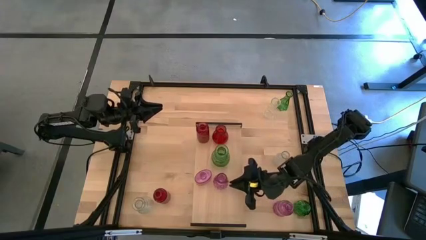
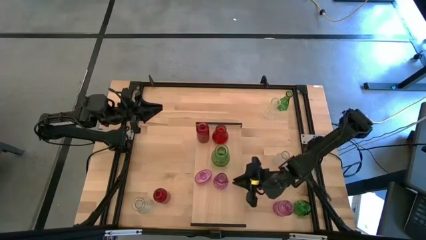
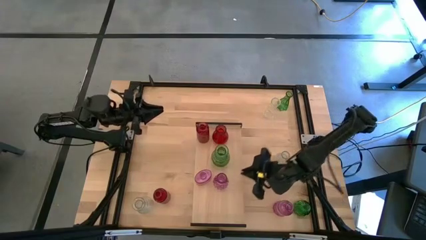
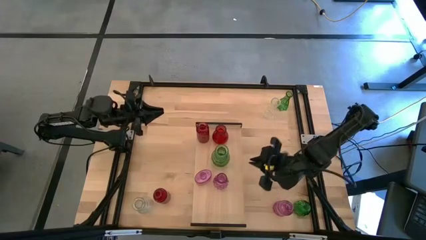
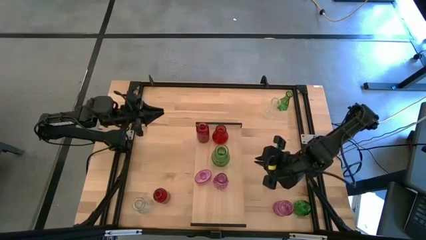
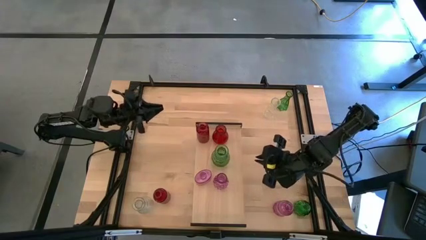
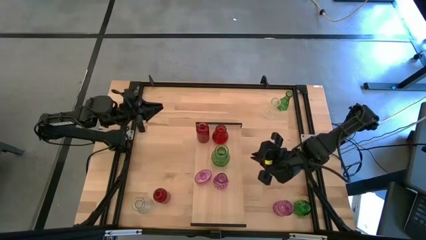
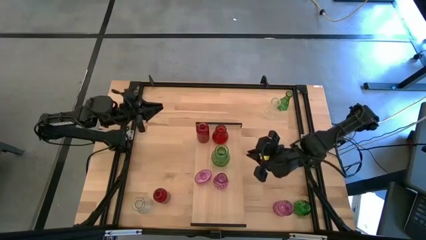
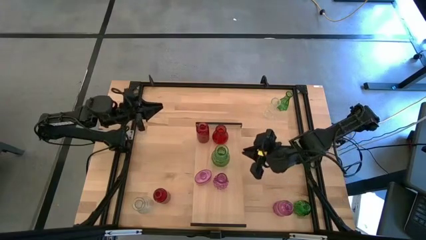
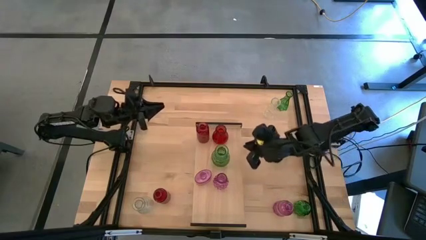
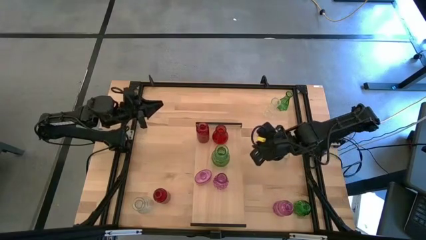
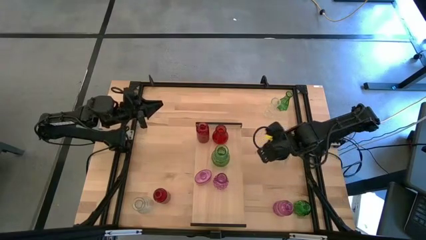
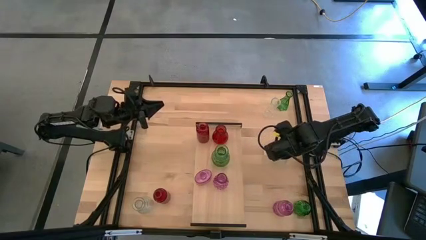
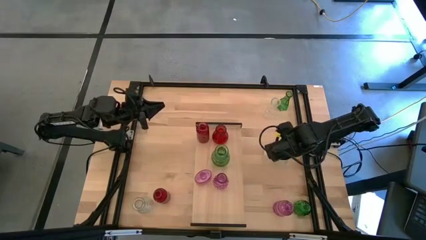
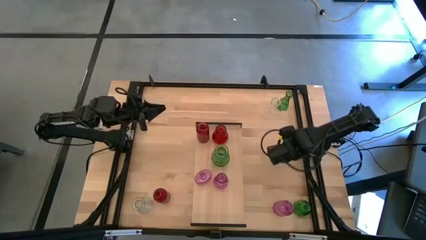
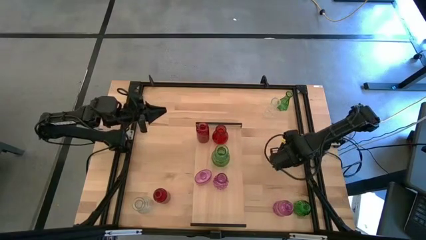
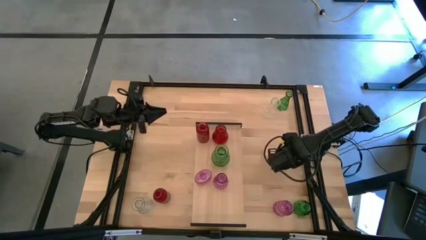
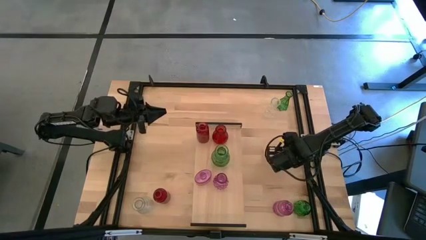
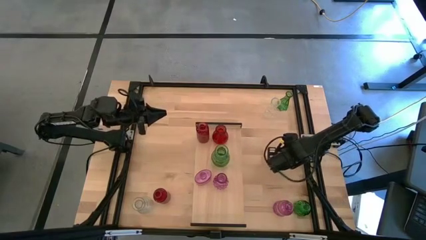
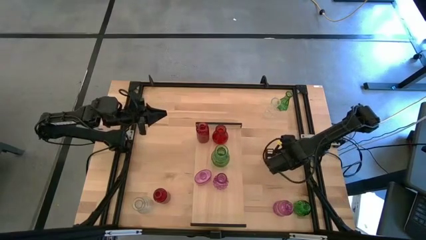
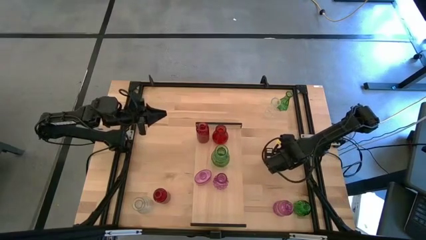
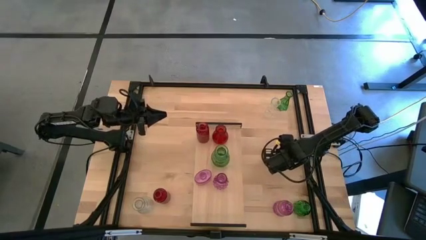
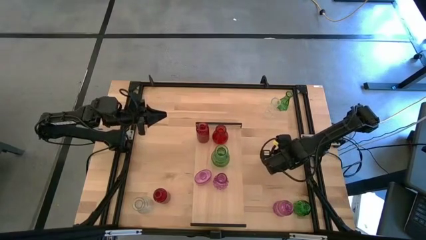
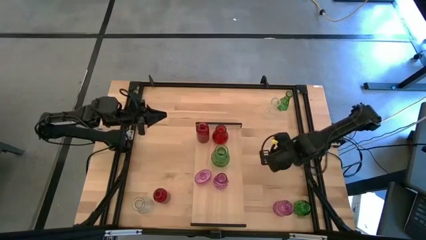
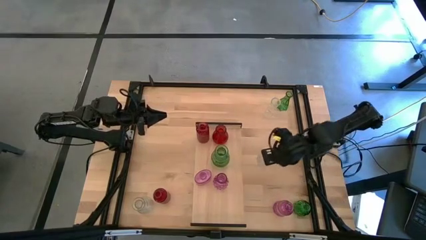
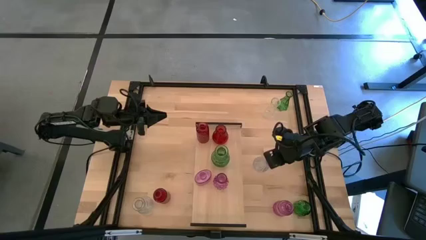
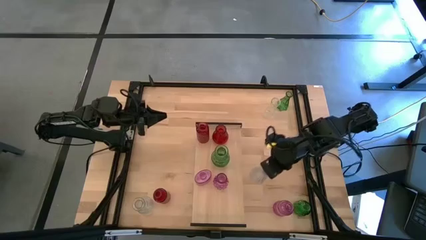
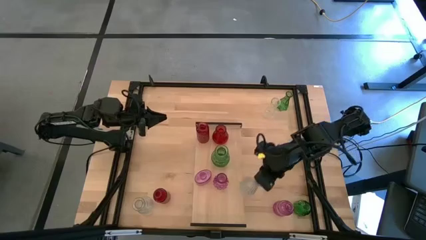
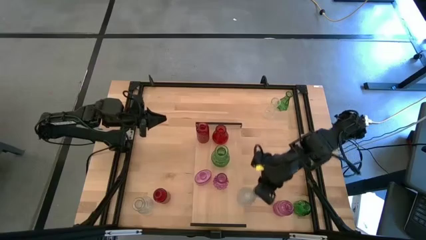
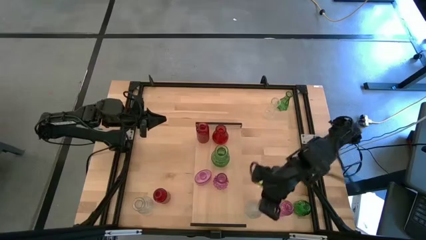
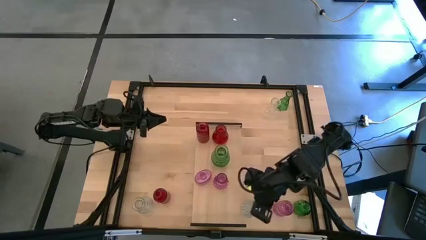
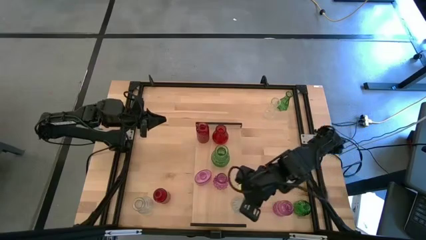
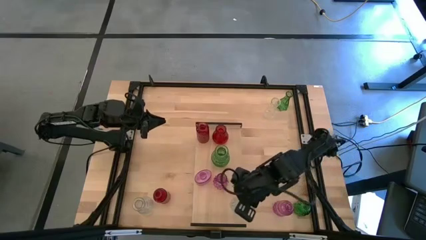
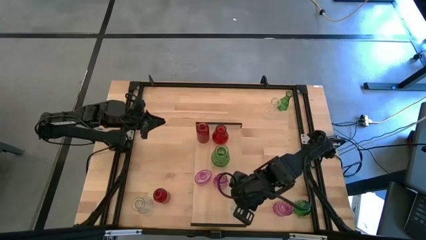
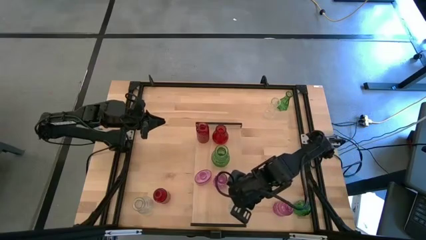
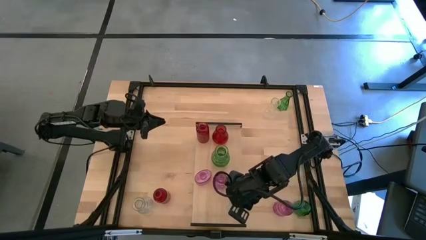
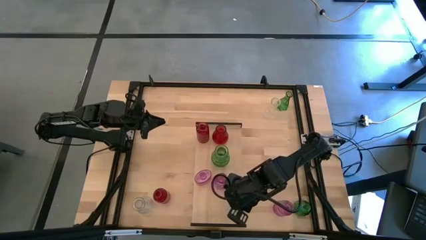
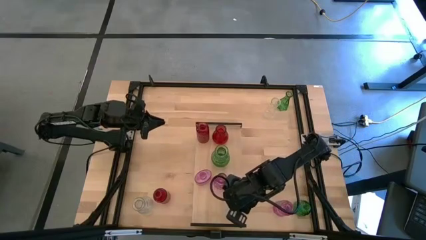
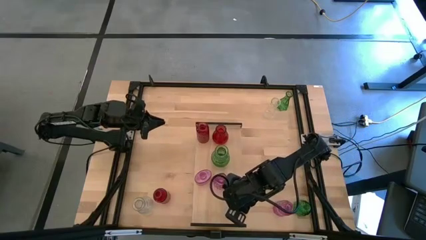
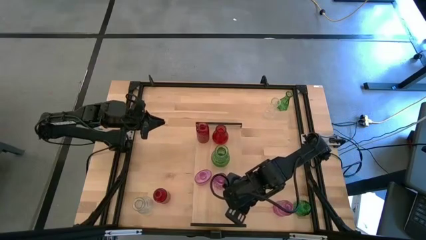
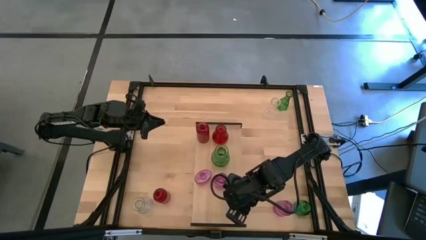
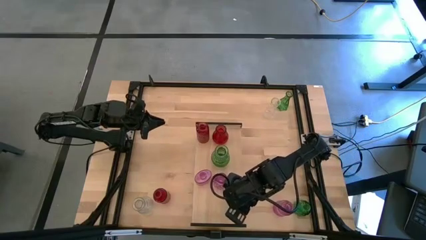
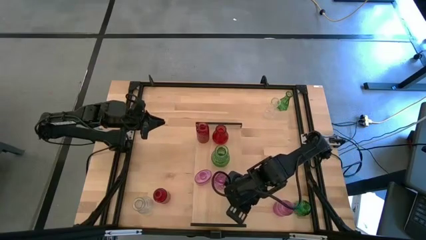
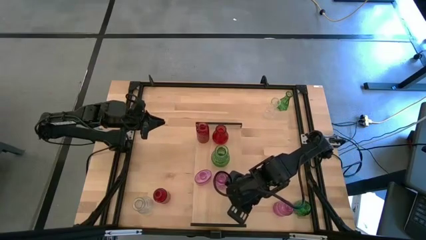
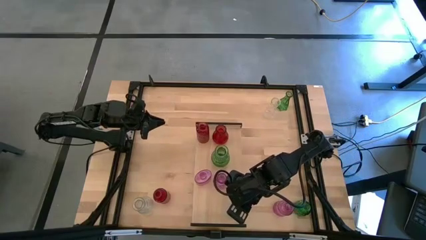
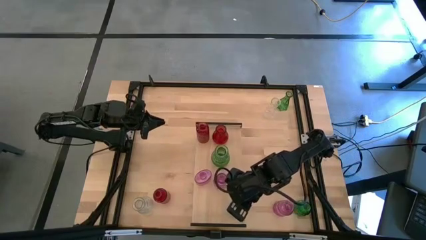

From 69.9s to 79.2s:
Task: sort vases onto shelf
Put the middle right transparent vase on the shelf

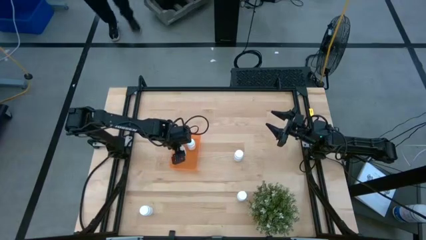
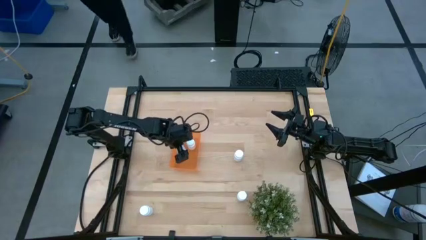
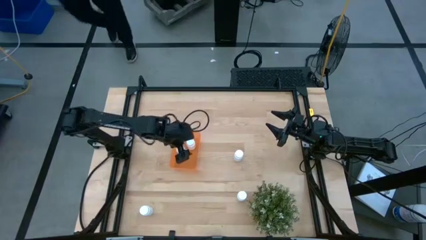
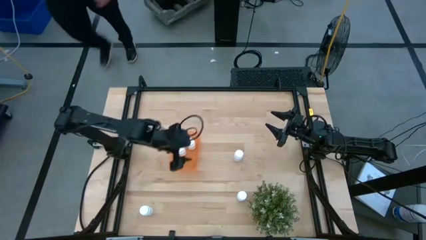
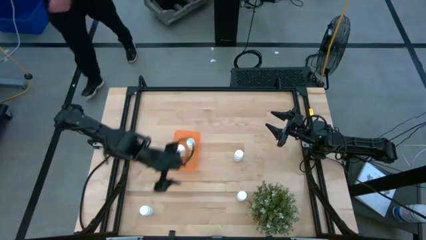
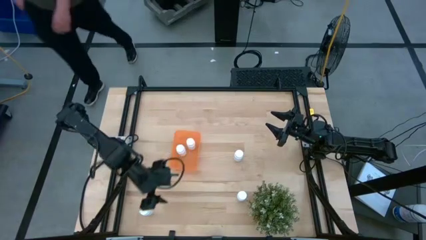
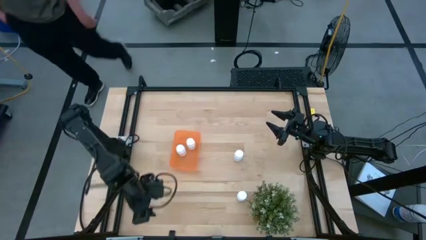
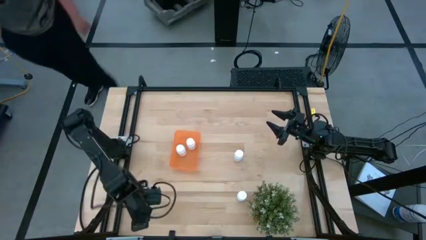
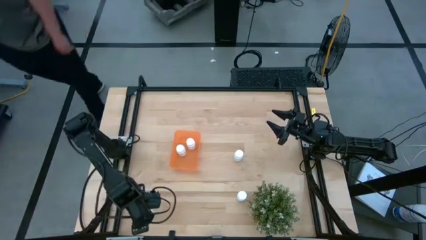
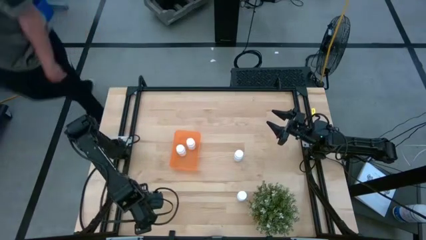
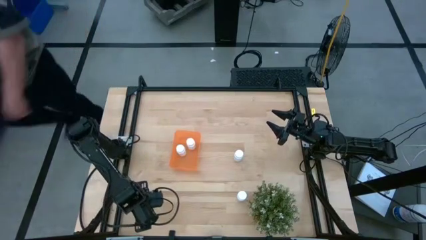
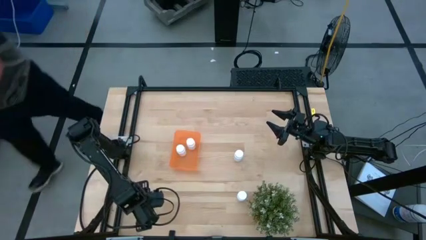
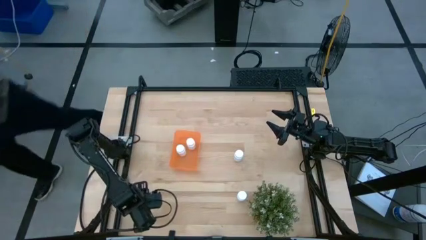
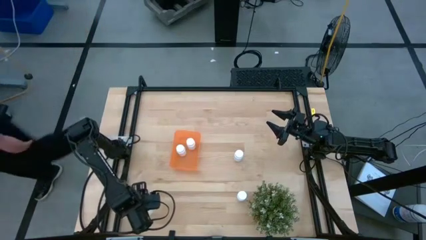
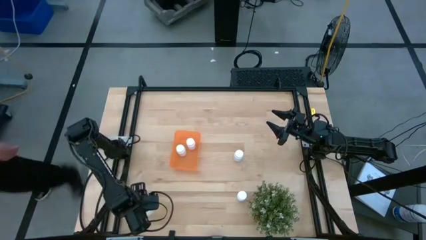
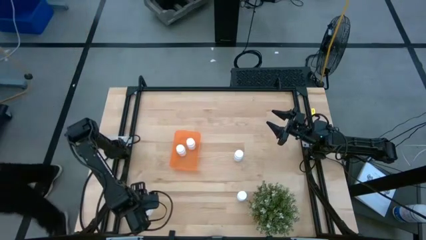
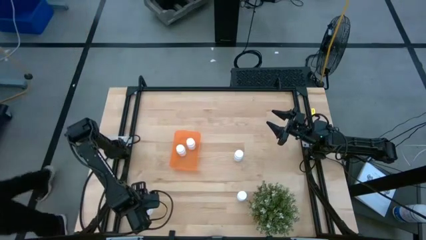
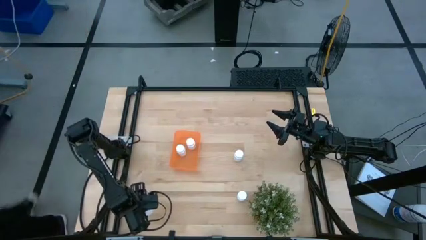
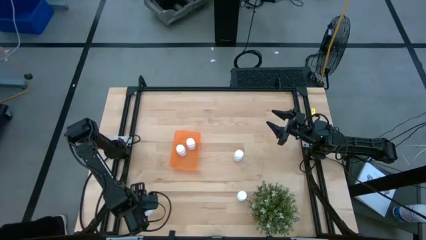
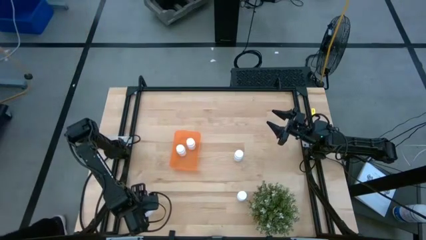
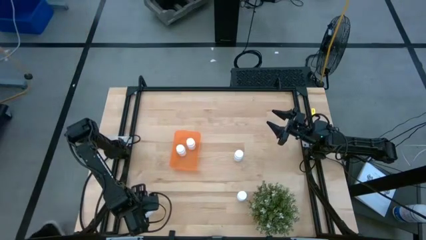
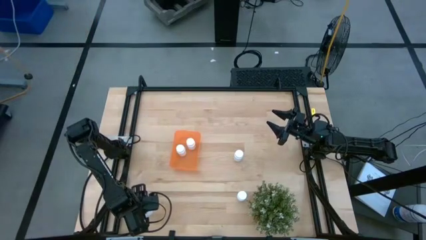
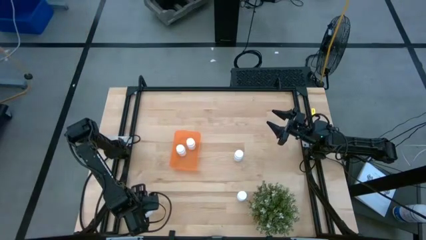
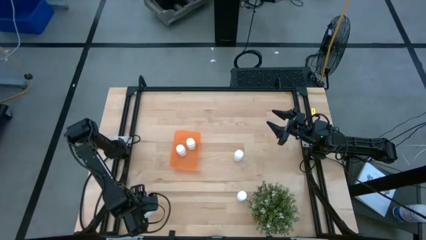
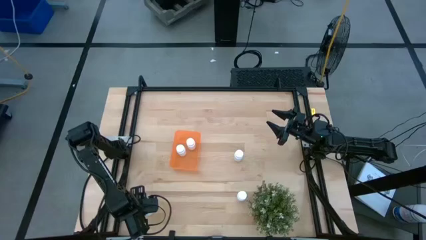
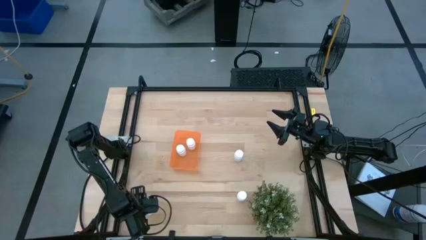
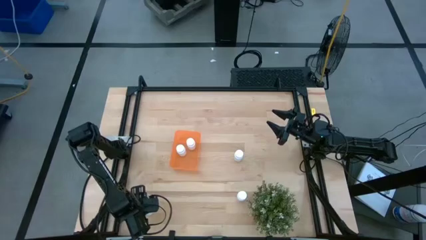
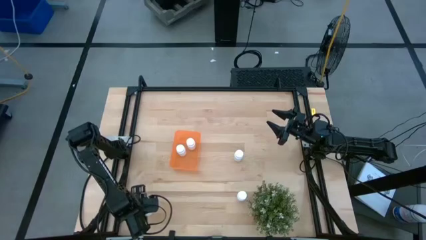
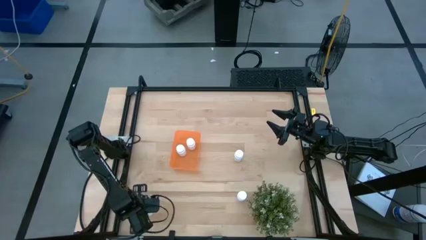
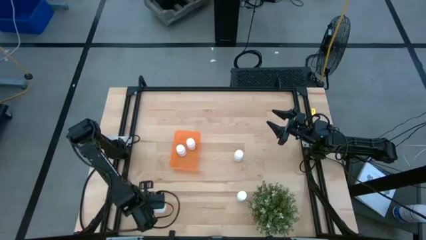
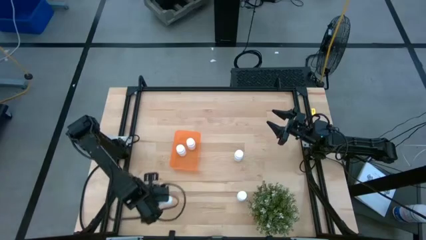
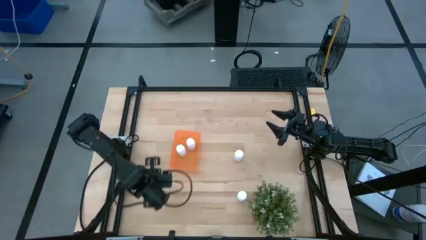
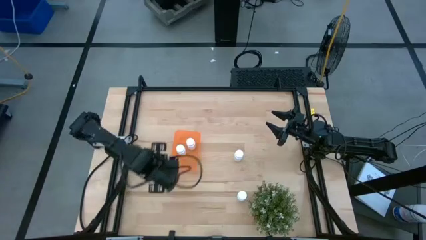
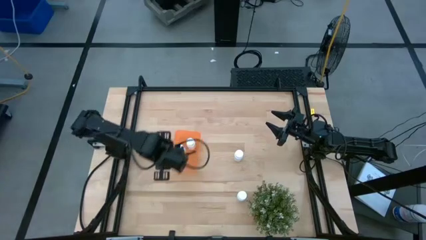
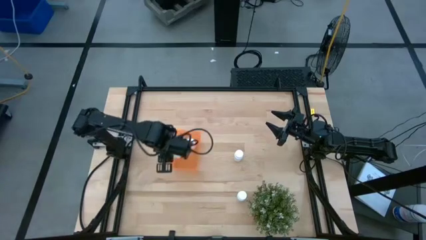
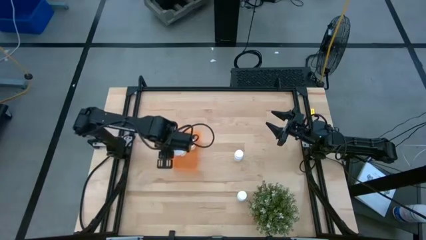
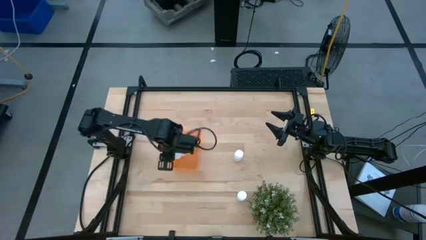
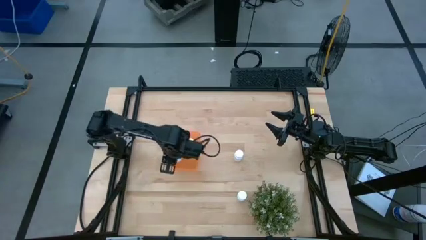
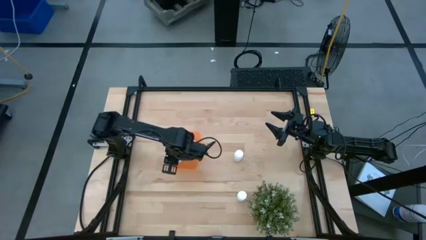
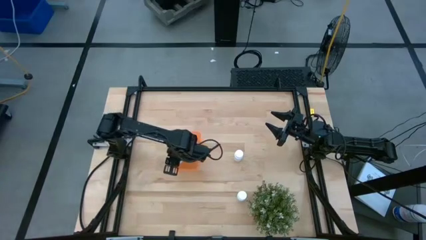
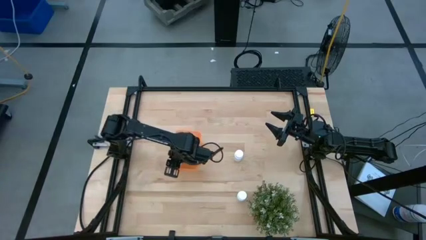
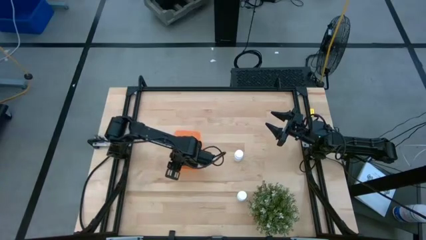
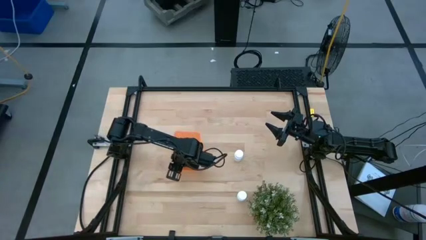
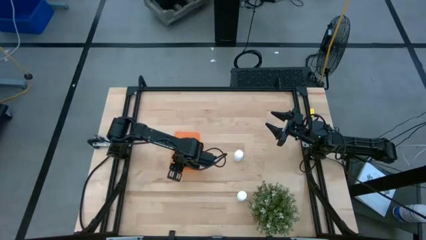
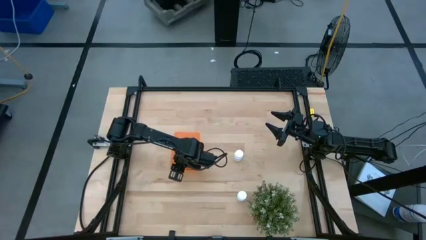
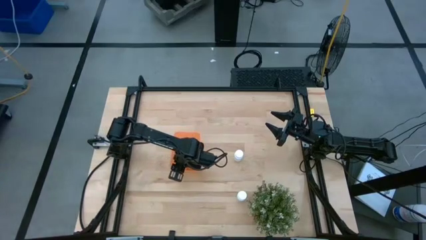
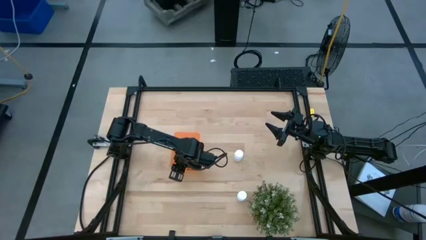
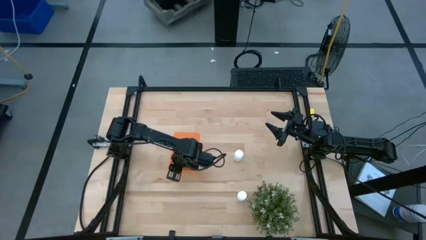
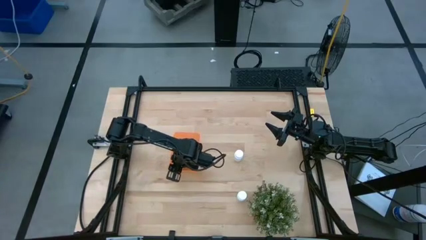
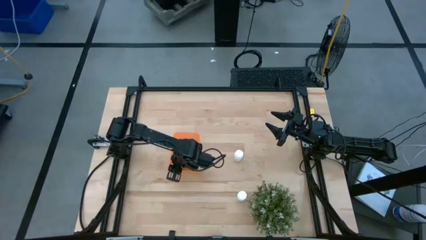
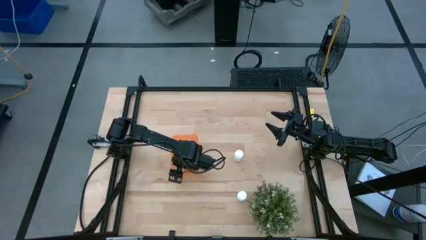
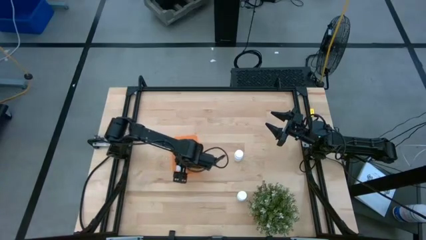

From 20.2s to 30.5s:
Task: Pick and place pill bottles into a basket
Put the white medicine bottle into the orange bin
